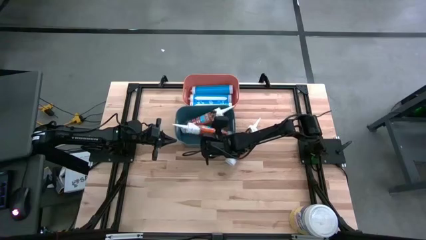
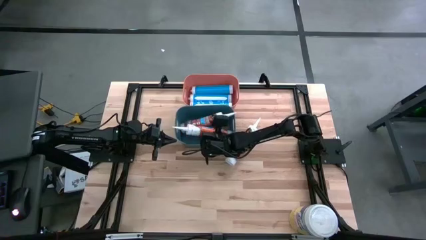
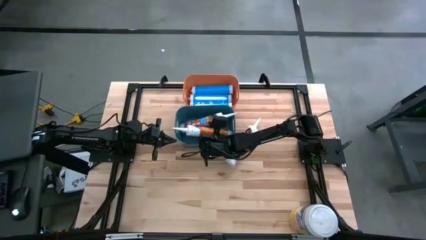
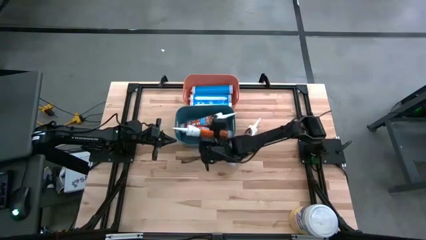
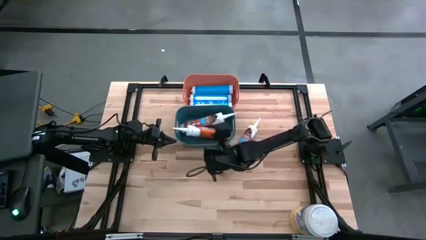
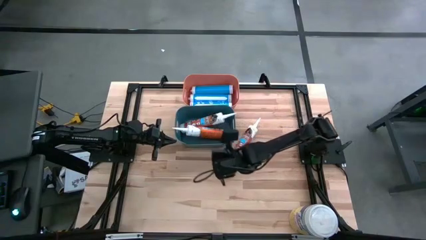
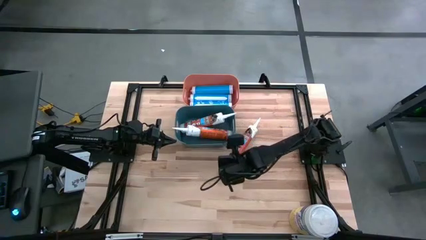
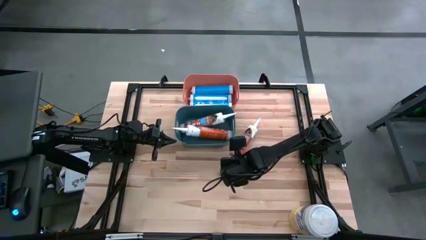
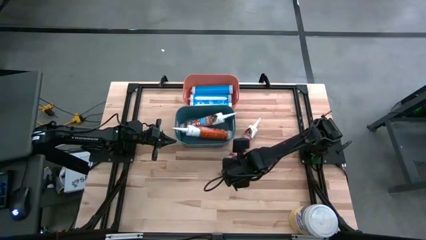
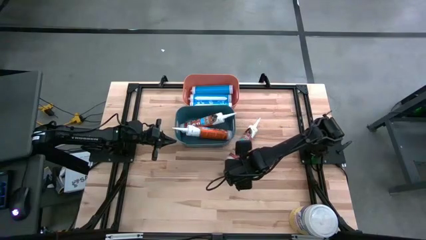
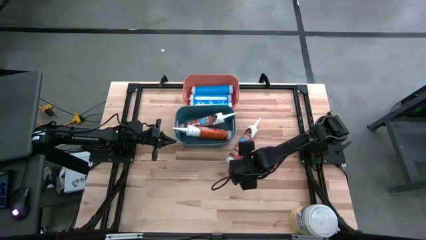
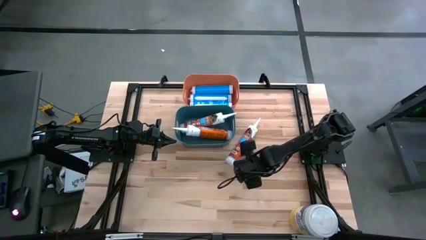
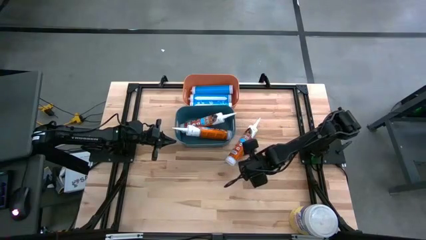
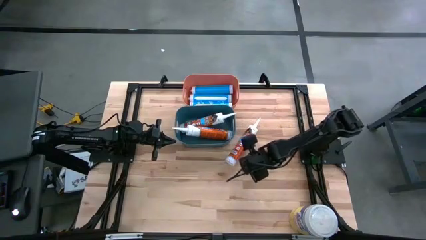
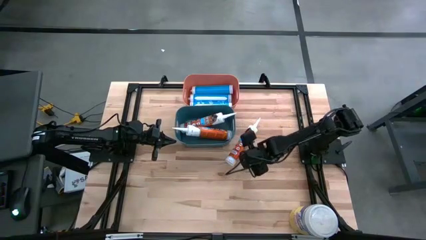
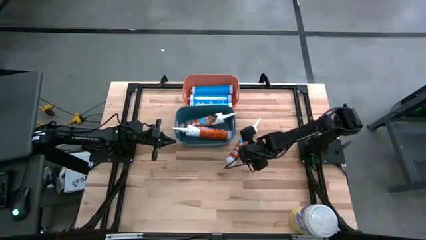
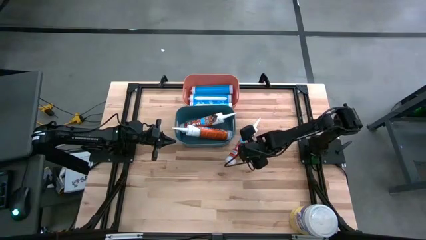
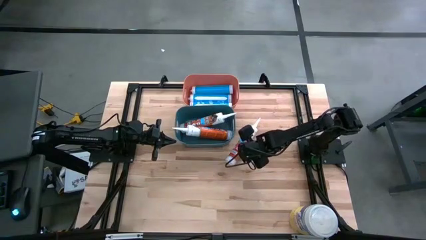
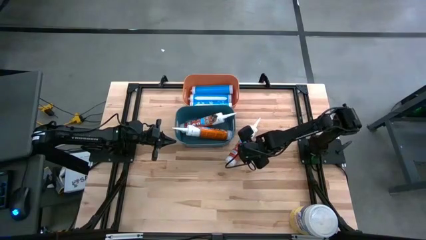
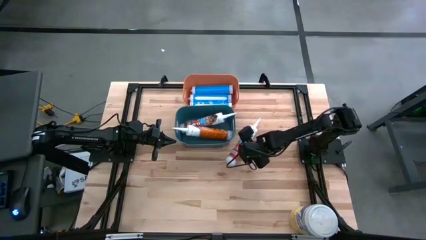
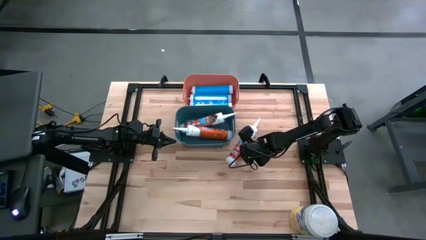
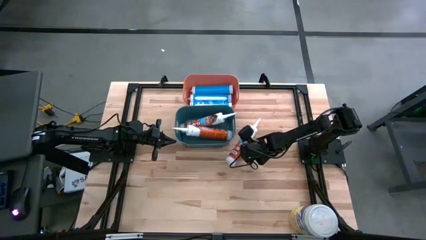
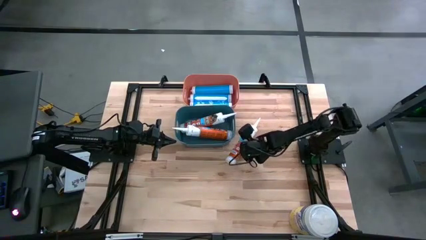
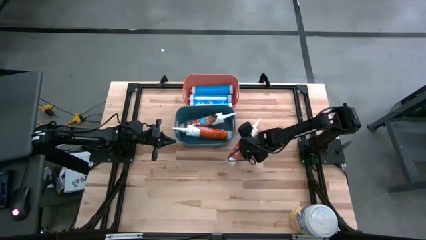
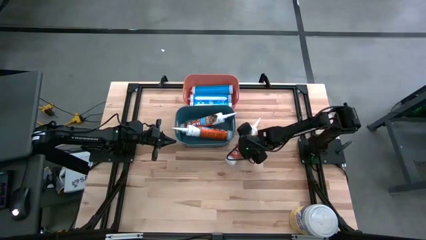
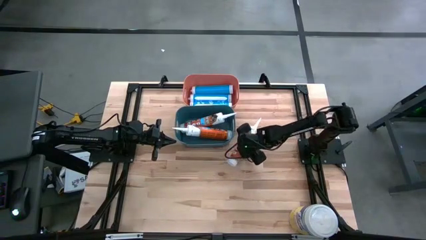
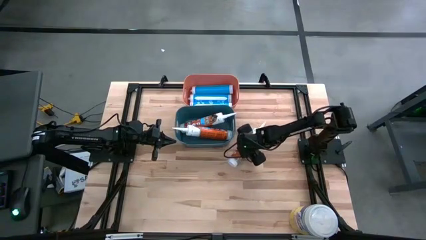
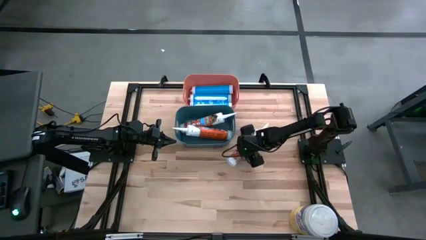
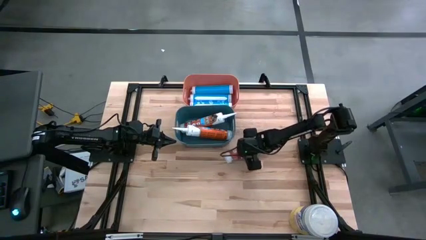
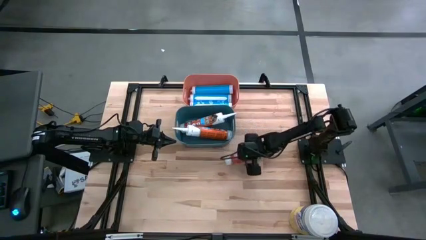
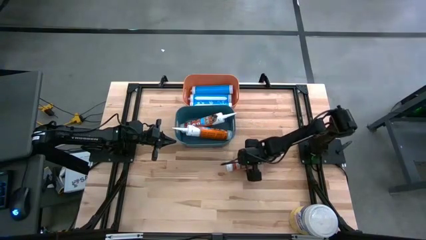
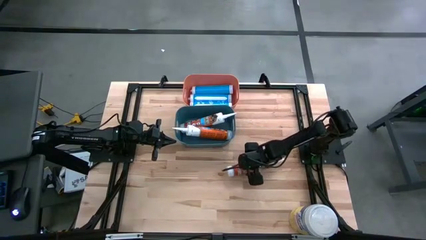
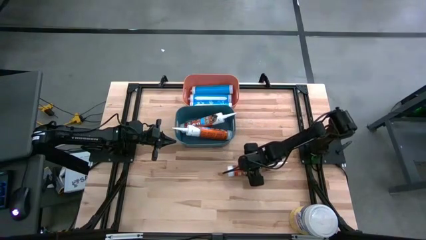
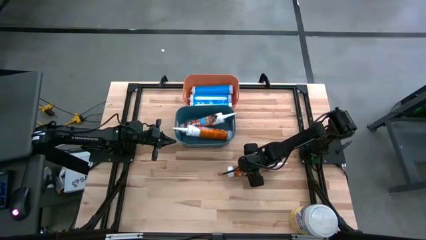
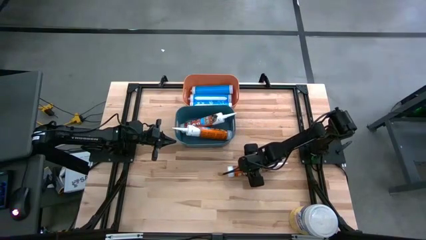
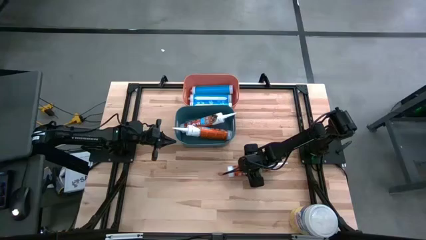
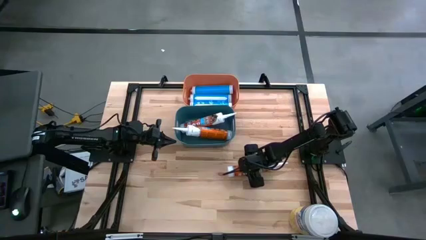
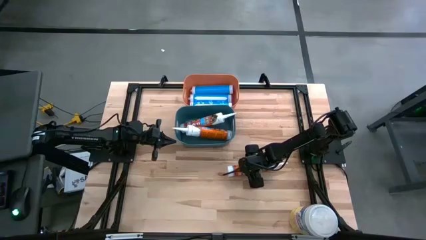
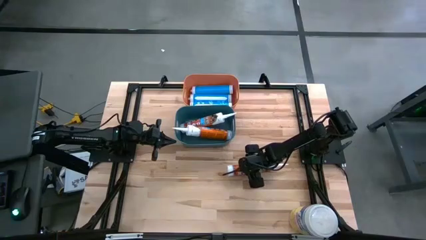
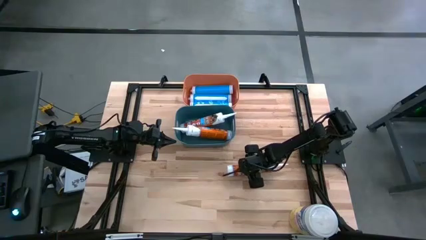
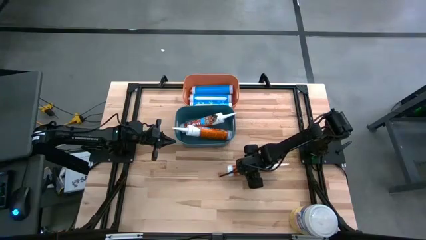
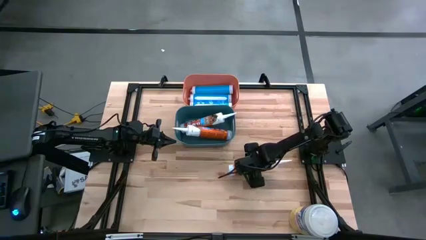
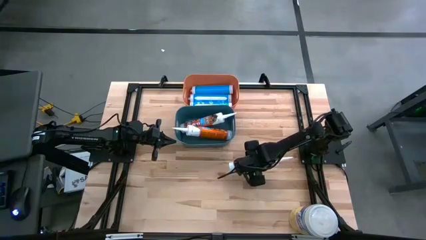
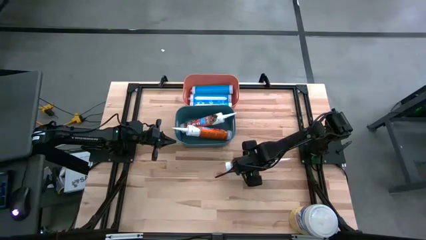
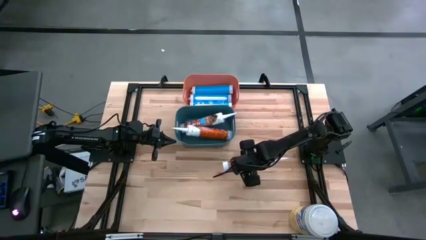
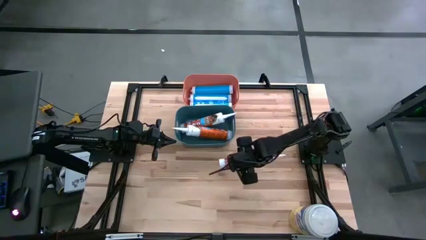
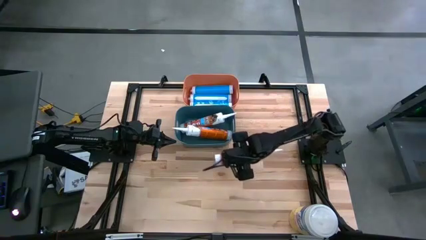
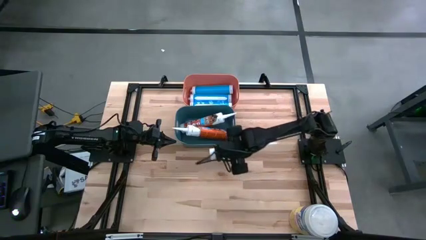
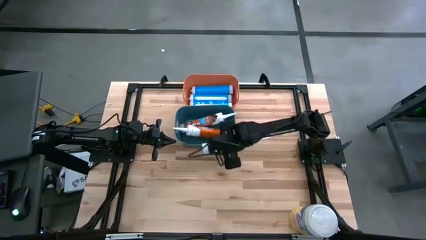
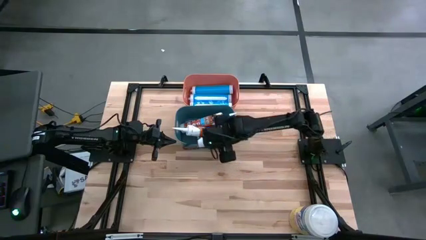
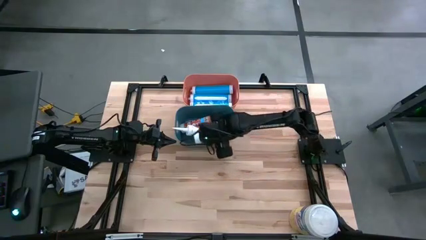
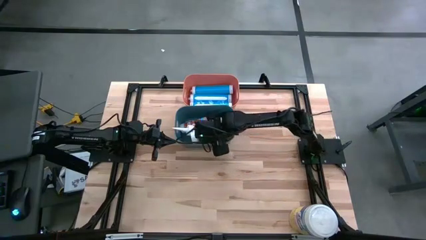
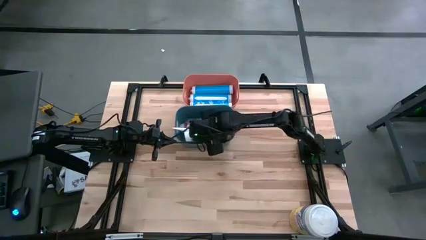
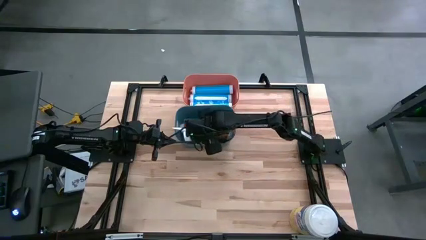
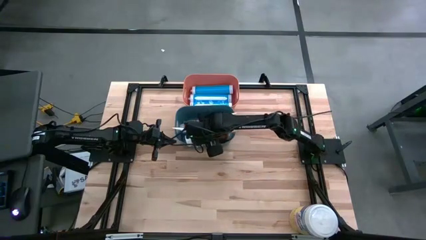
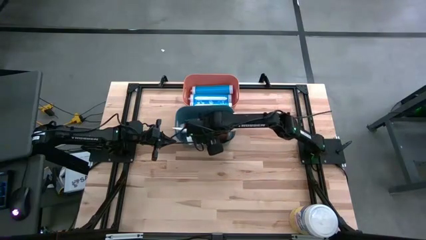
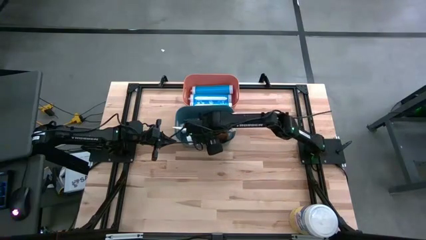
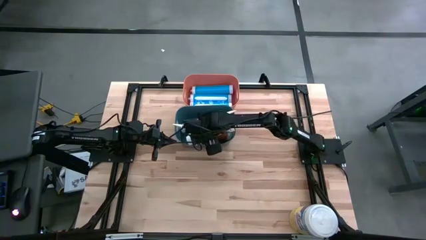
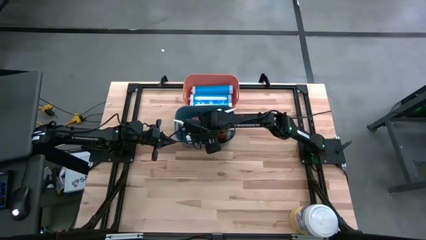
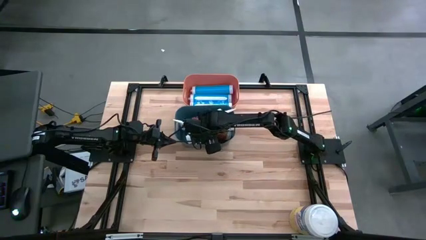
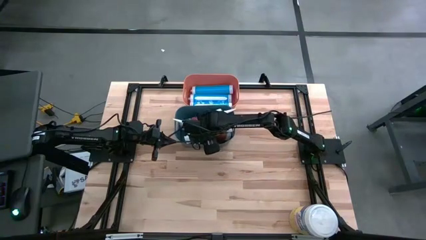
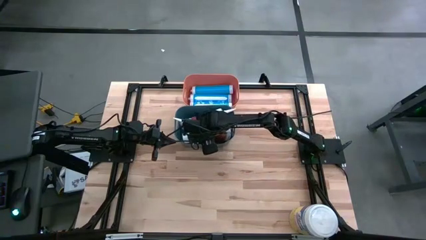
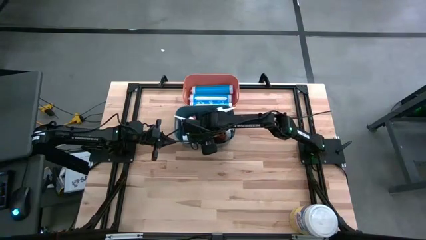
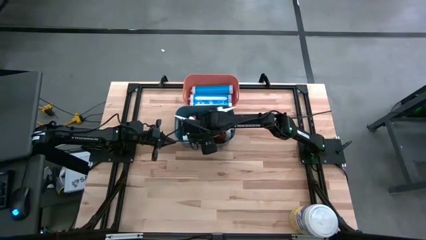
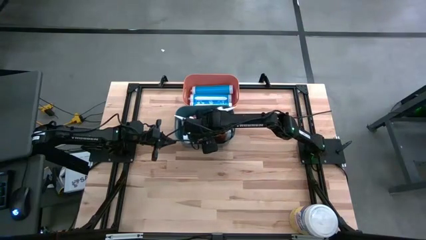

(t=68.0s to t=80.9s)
Task: Pick & place silicon tubes, Sealant and Lysol wipes
Put the orange sealant into the blue bin
